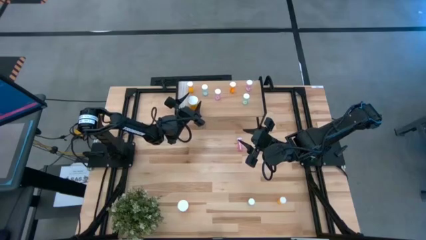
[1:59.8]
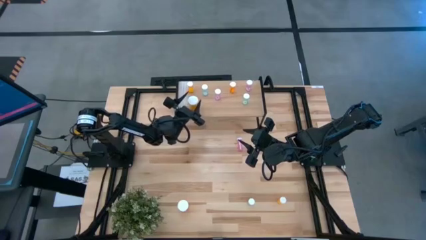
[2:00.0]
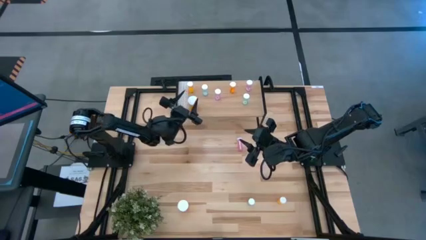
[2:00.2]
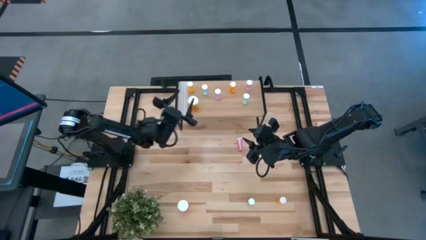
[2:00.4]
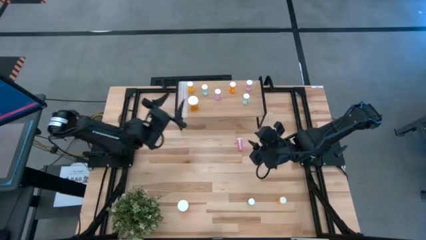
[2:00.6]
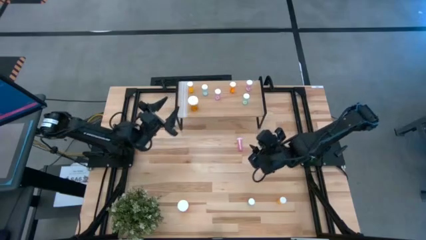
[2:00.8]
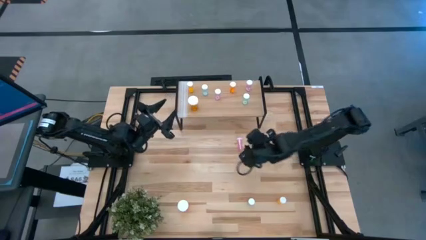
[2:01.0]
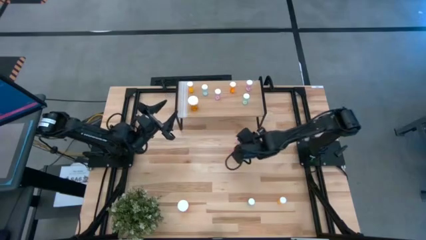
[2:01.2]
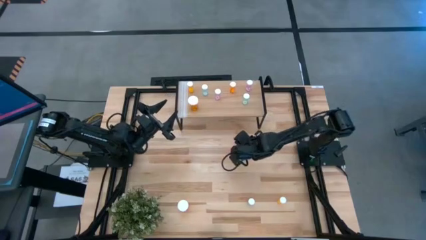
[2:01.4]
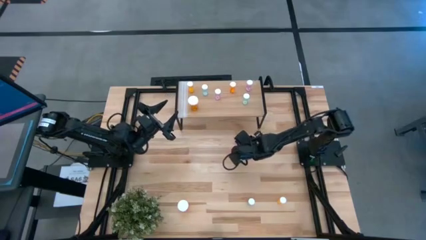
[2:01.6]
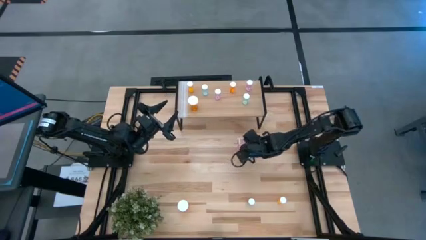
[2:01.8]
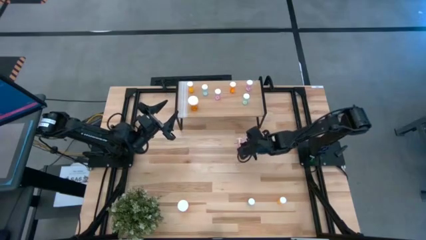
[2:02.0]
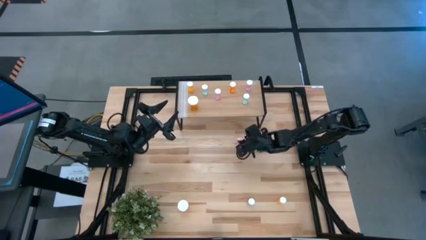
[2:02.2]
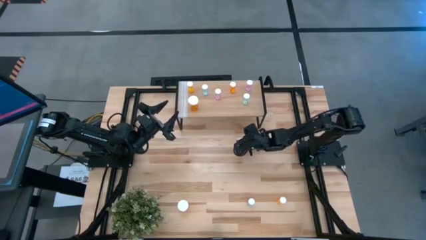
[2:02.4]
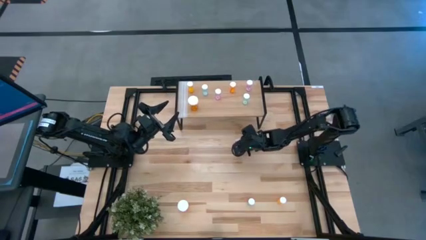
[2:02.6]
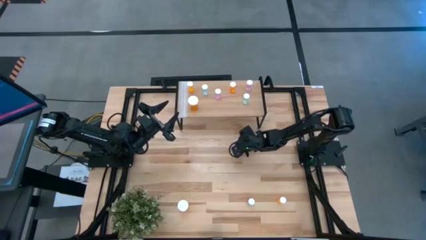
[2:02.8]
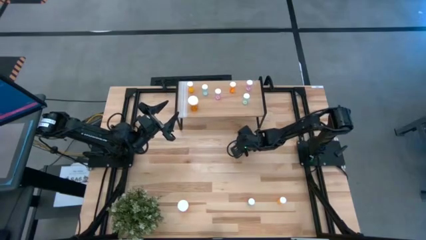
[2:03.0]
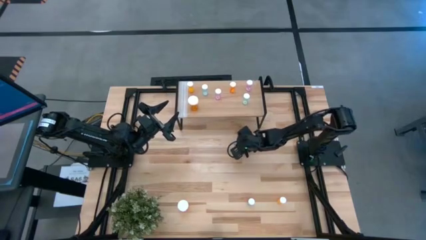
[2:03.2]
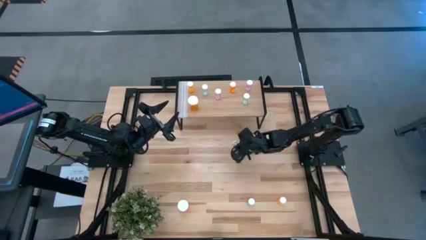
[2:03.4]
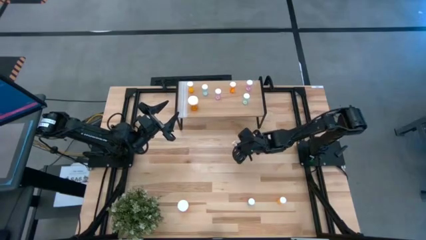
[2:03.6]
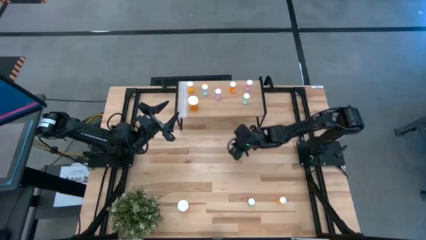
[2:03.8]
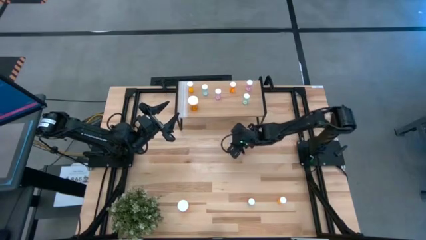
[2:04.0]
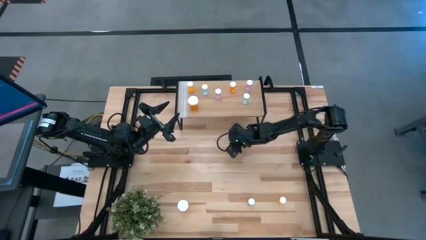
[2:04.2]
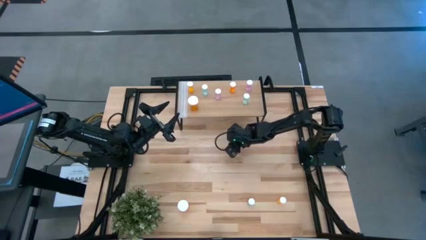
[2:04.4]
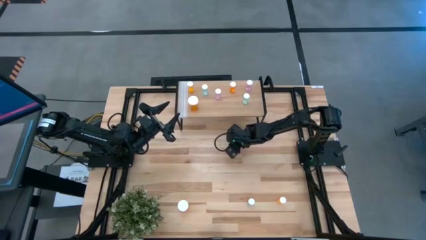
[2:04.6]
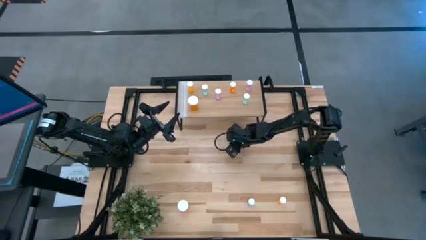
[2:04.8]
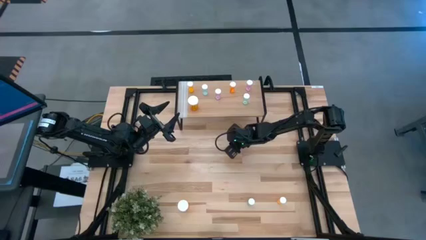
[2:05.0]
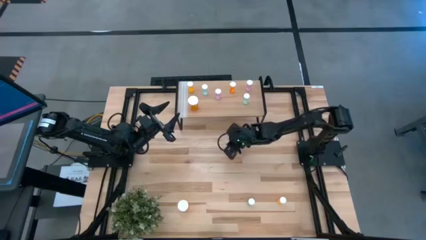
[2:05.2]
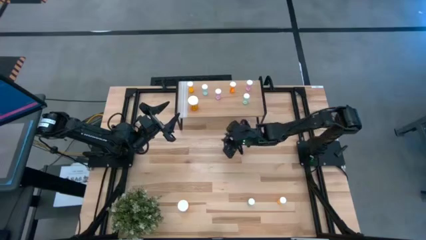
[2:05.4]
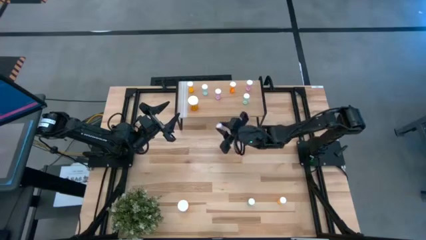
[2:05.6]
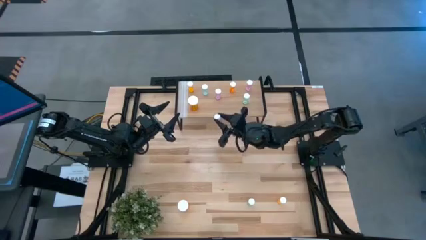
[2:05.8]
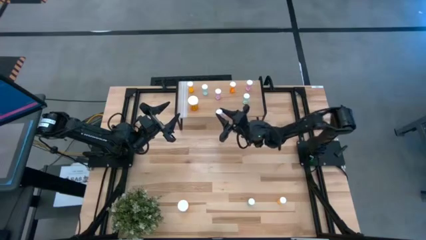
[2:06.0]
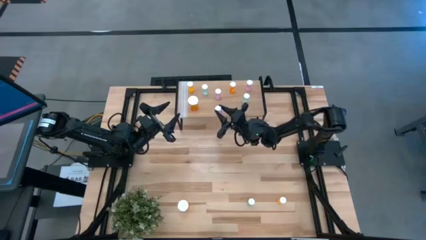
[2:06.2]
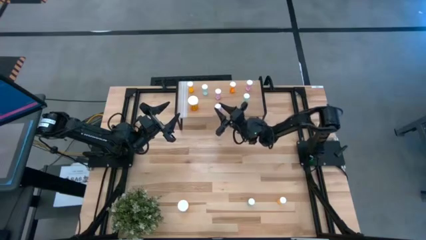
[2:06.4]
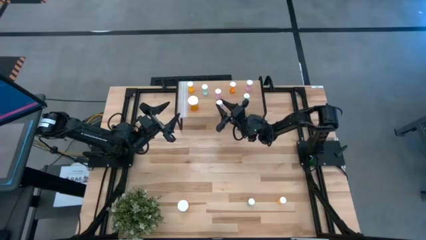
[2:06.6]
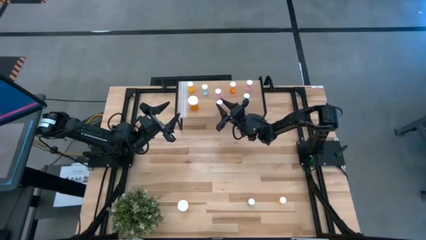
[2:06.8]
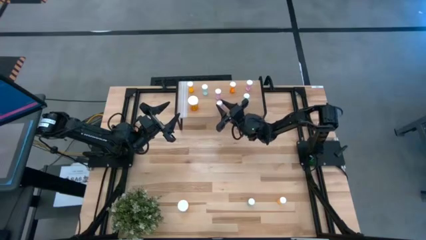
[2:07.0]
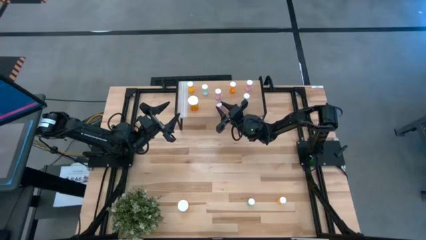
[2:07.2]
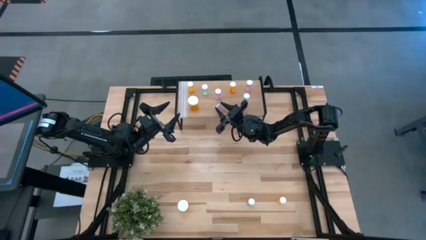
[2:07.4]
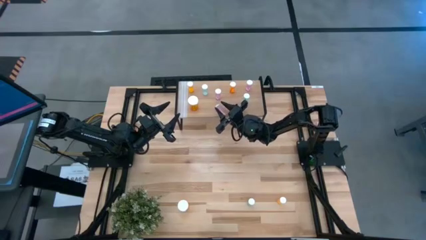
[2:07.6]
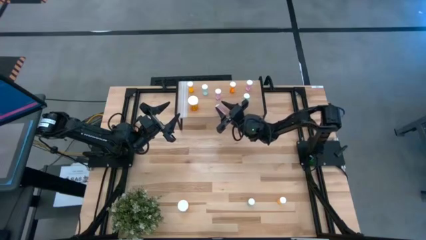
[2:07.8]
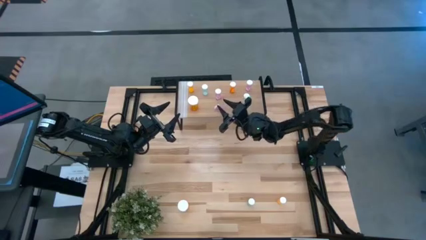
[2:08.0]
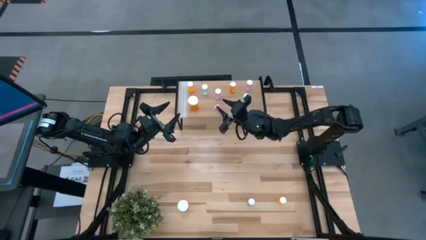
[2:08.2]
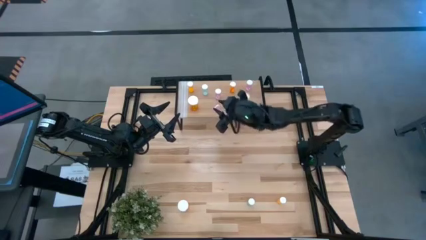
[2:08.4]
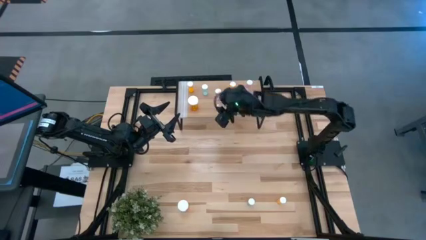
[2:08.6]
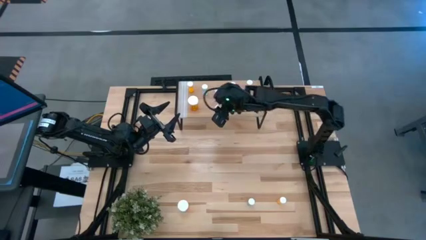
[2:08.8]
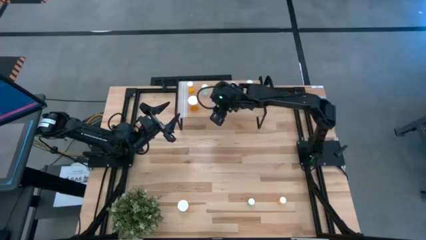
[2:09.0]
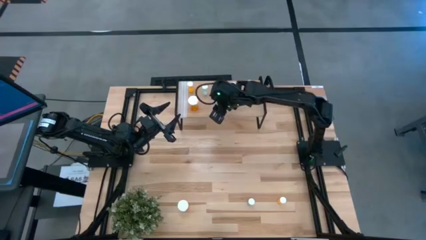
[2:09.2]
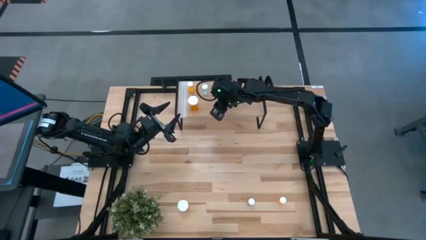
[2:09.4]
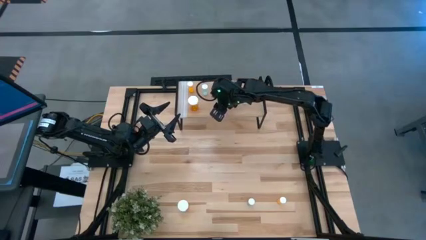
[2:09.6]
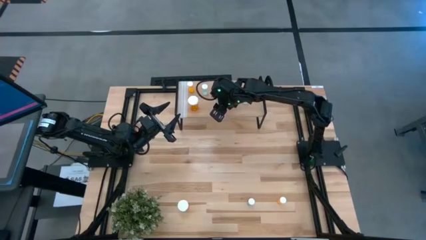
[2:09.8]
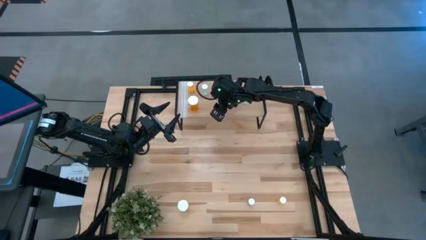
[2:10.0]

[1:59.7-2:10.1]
Task: Pick and place medicine bottles onto shelf by color
Put the pink small pill bottle on the shelf
